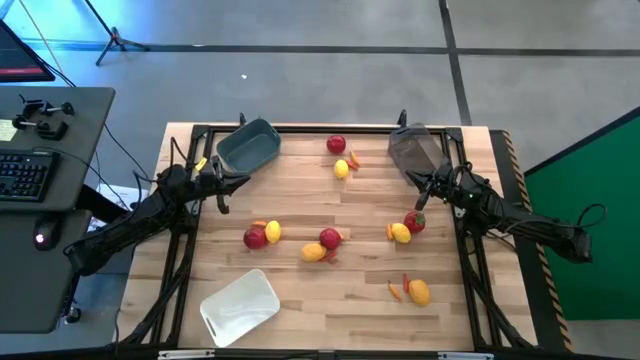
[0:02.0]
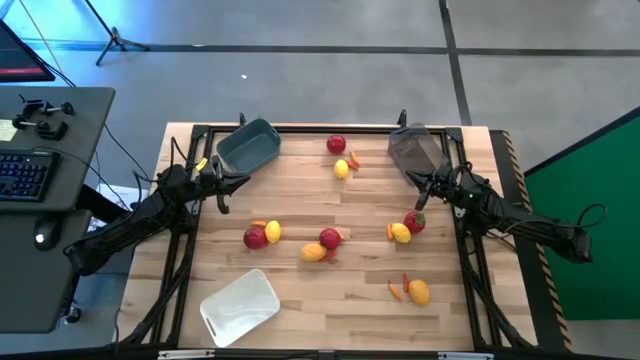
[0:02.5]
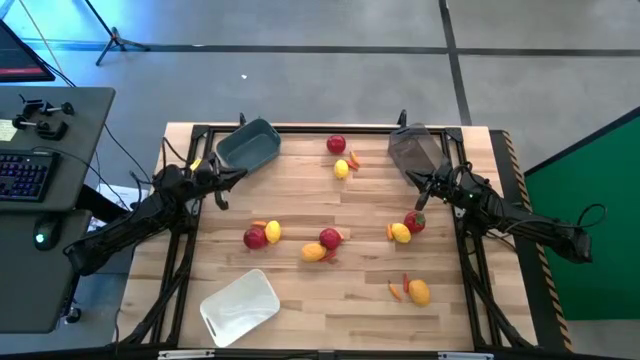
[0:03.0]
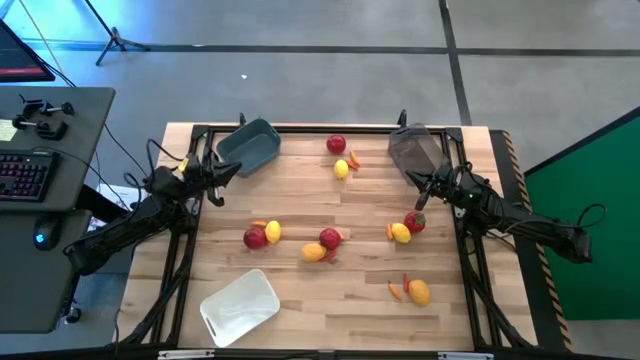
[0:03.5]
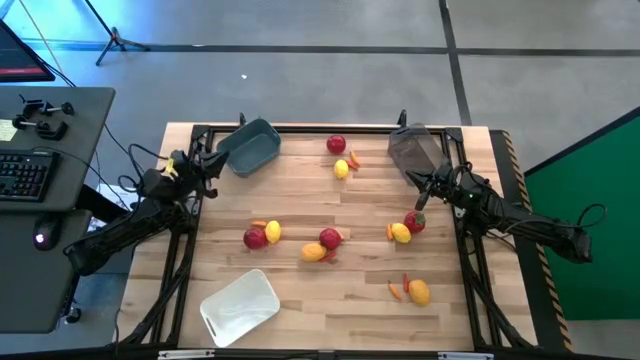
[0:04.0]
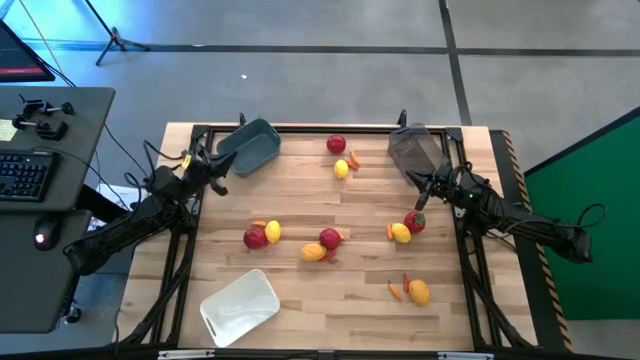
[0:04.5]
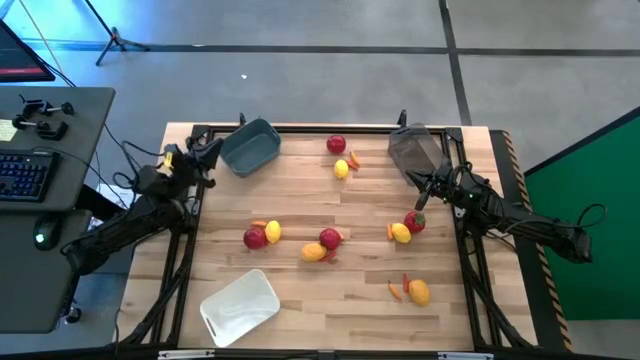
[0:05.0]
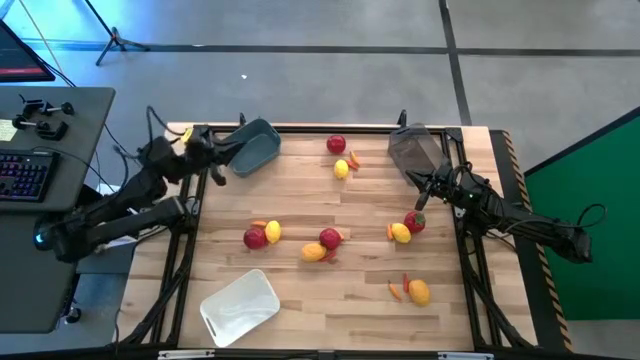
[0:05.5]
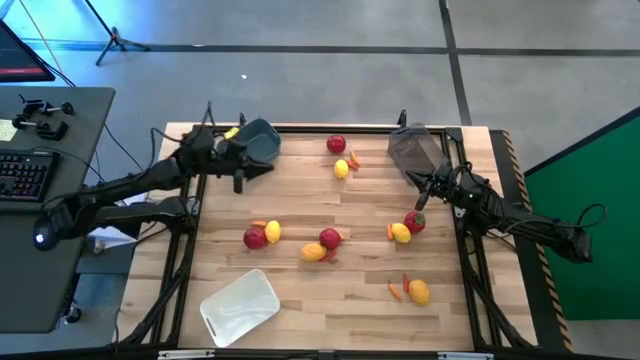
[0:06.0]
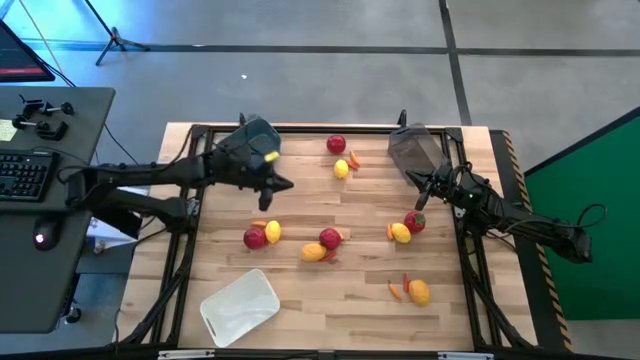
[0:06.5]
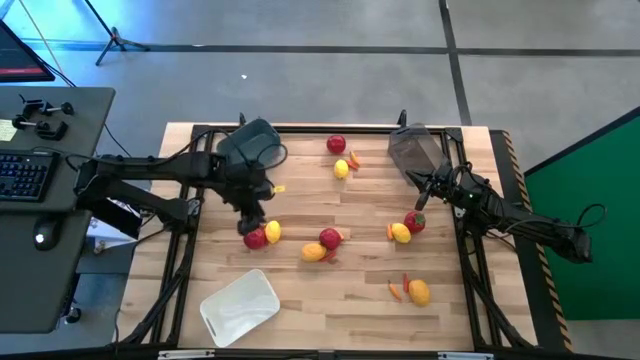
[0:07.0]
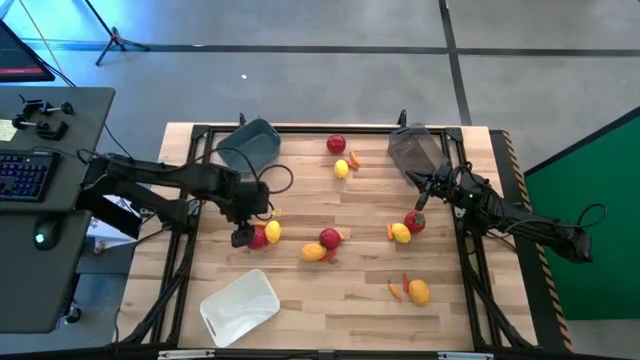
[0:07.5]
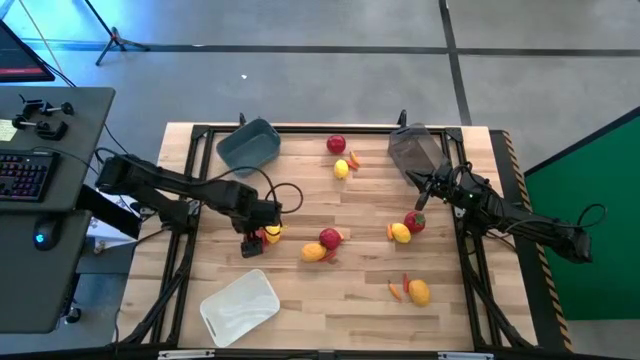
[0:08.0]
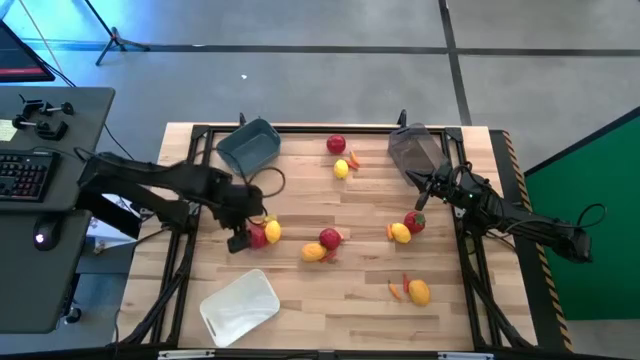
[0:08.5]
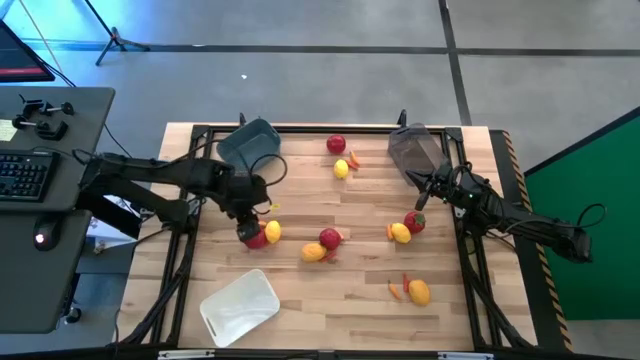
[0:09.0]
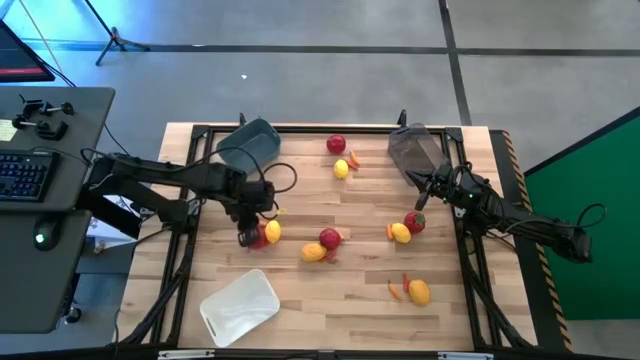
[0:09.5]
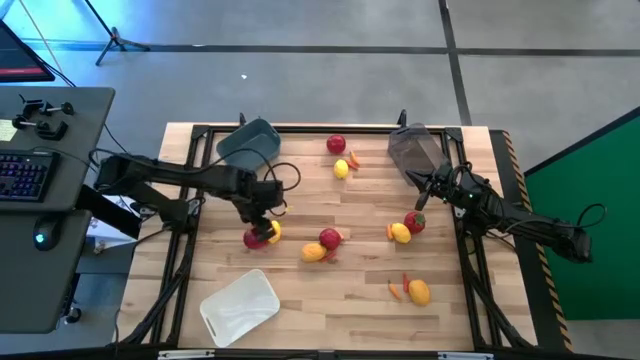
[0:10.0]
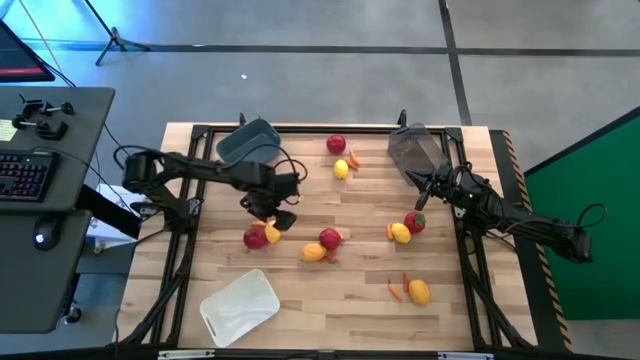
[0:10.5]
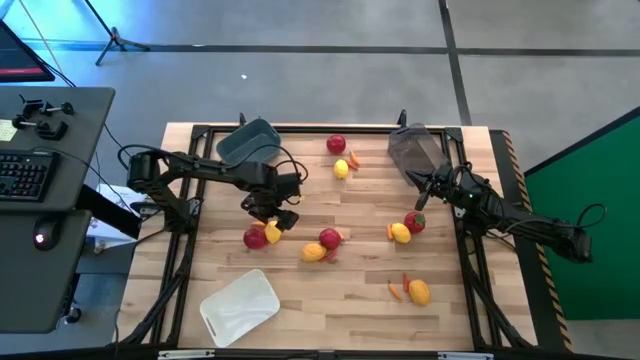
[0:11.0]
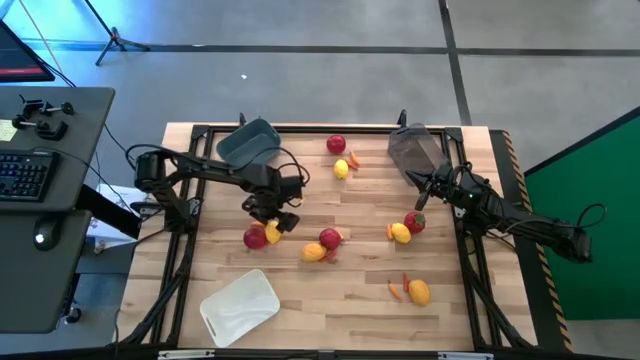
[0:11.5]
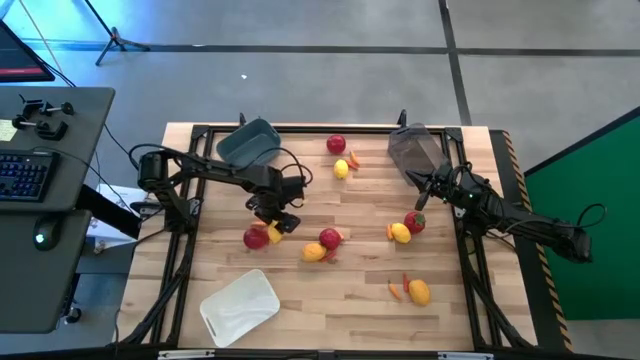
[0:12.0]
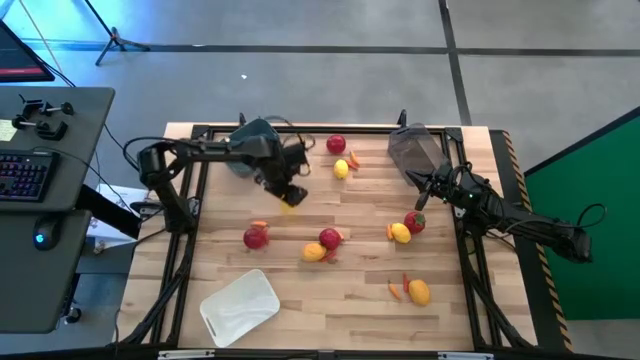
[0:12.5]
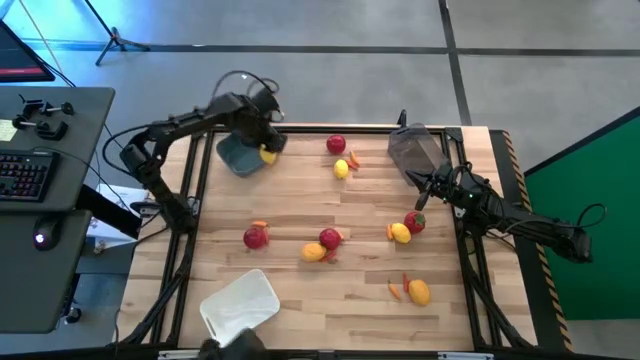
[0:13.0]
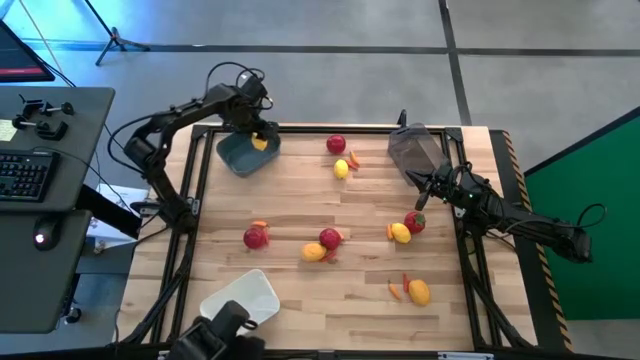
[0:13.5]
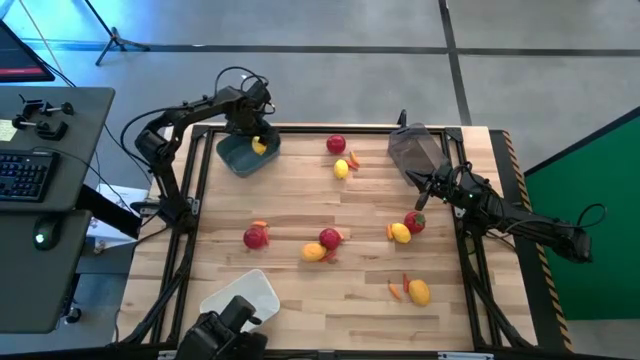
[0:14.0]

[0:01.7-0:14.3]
Task: Sort produce into baskets
Put the yellow lemon into the blue bin

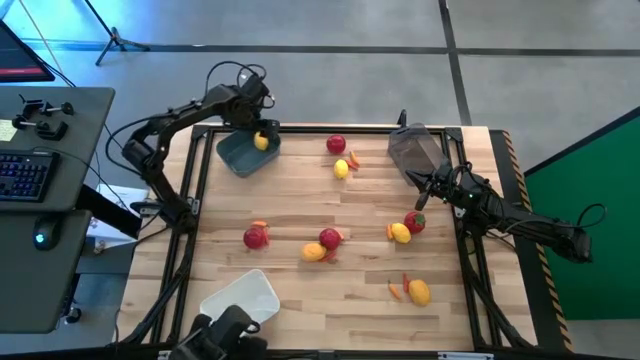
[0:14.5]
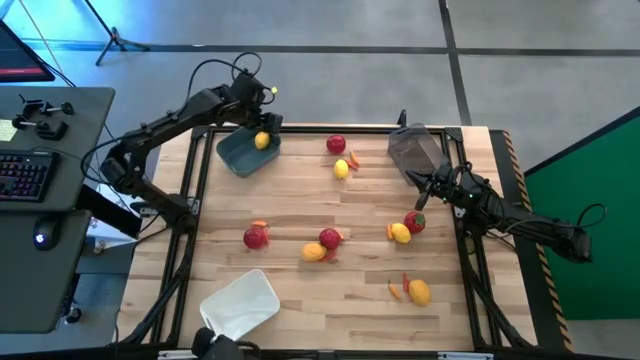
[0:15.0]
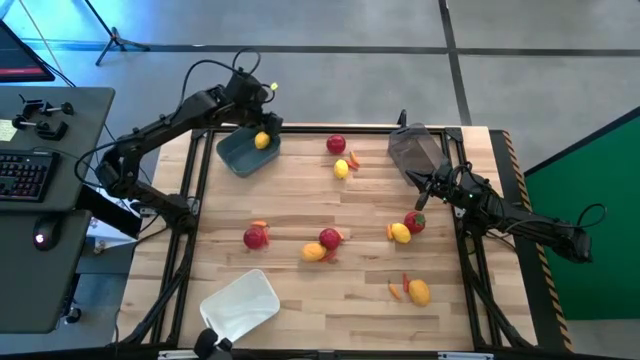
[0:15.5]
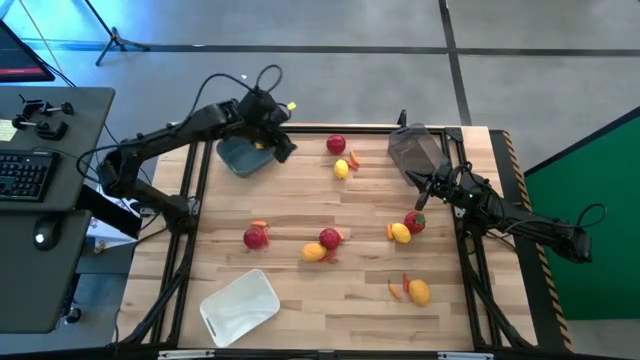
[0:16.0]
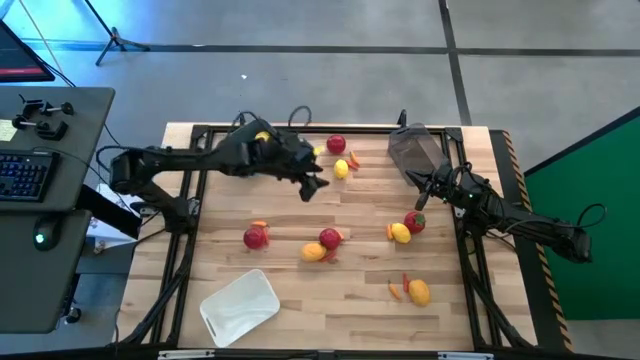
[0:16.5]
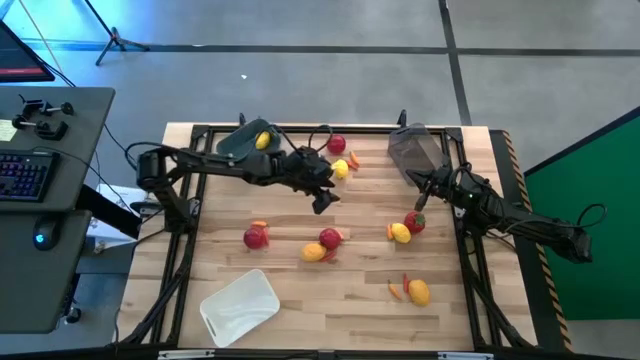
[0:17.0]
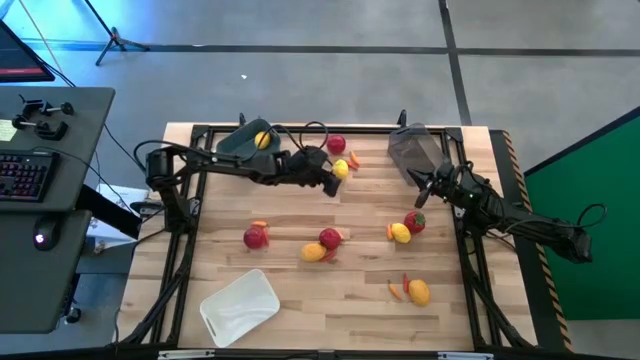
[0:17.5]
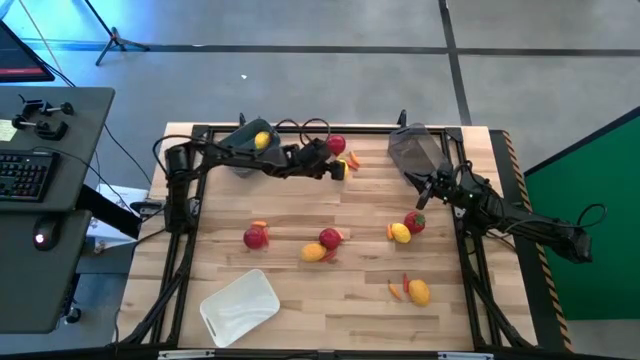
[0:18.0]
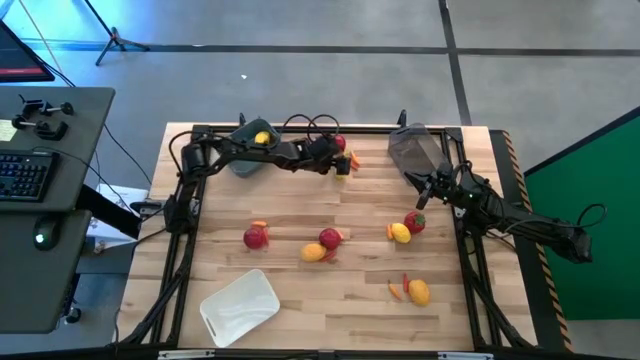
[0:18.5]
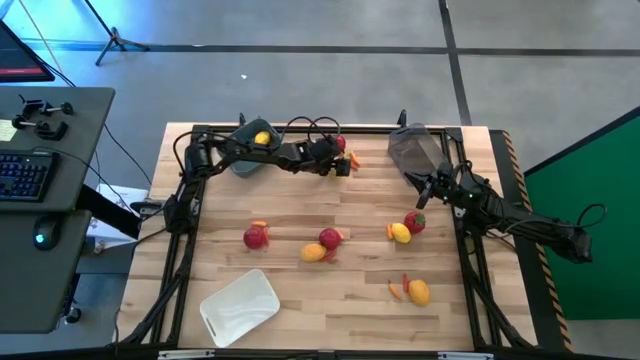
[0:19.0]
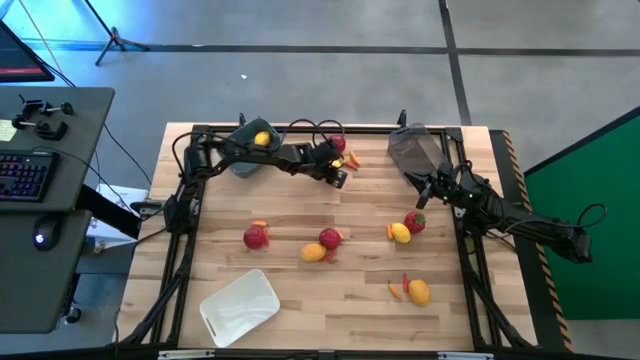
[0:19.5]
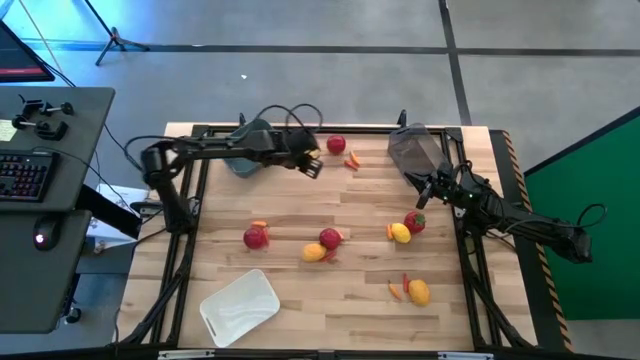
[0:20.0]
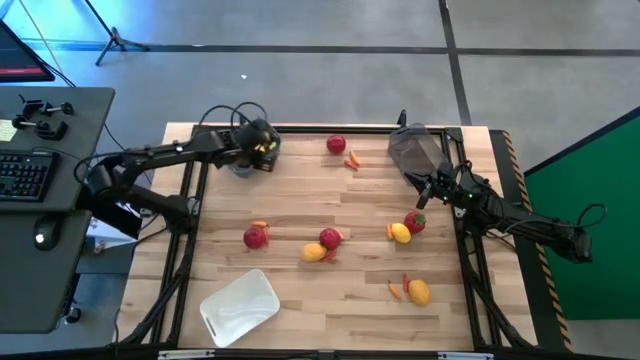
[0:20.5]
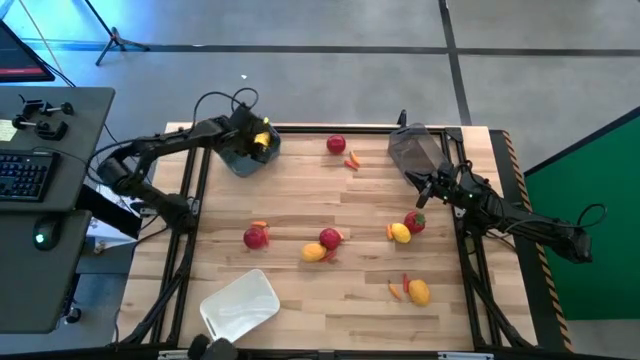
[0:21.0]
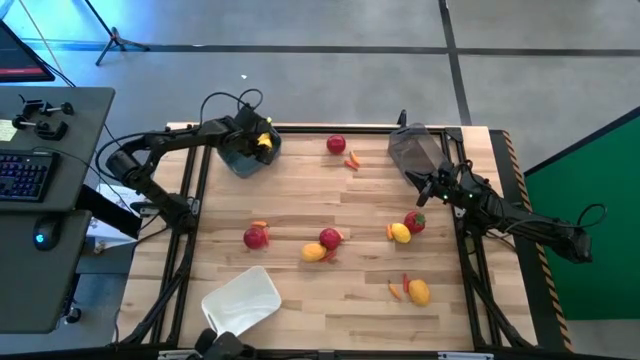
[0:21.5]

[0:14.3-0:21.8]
Put the yellow lemon into the blue bin
